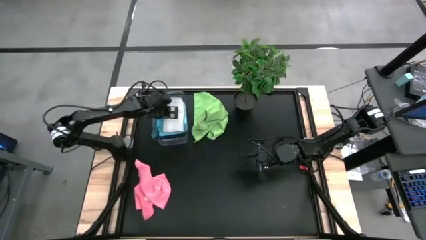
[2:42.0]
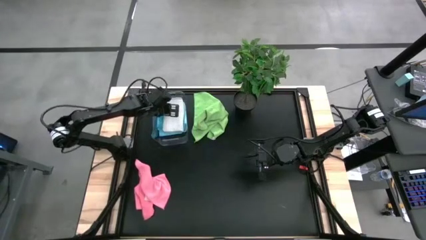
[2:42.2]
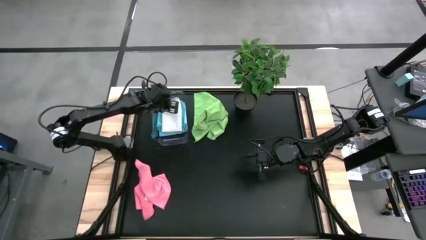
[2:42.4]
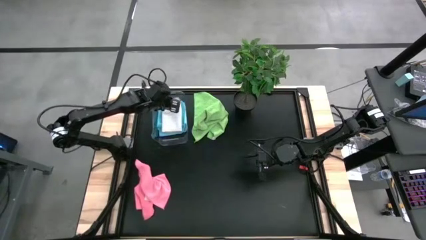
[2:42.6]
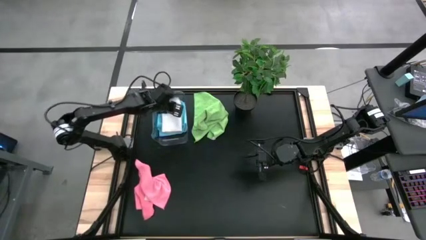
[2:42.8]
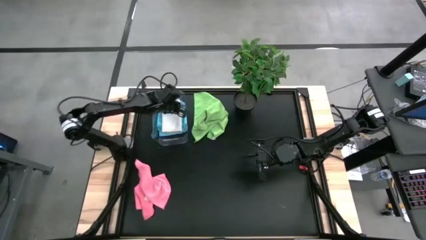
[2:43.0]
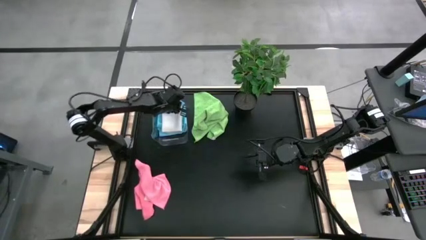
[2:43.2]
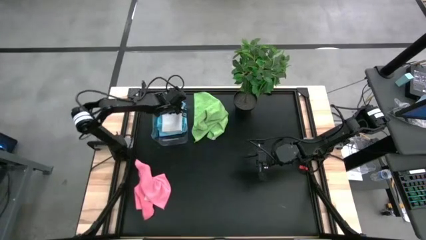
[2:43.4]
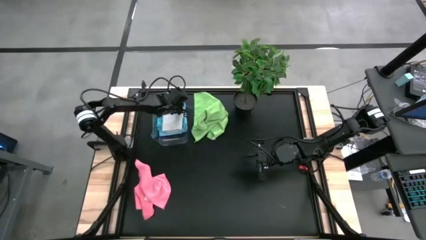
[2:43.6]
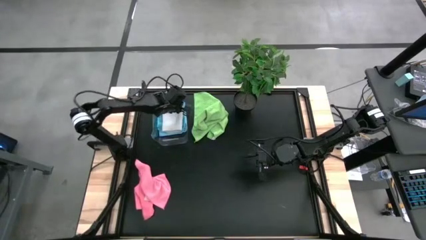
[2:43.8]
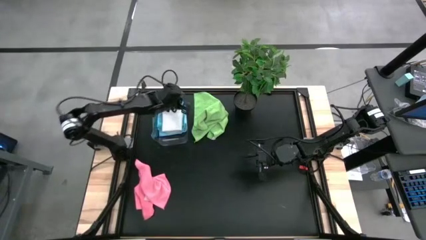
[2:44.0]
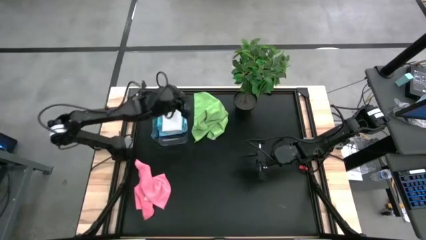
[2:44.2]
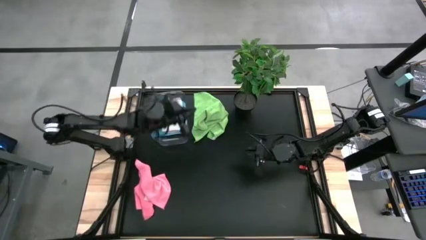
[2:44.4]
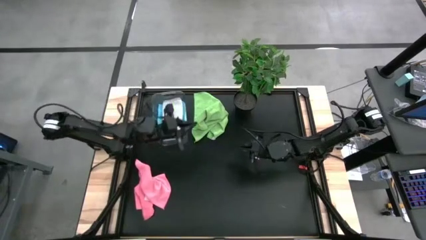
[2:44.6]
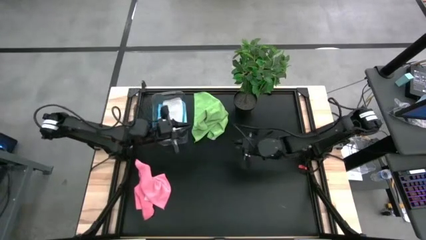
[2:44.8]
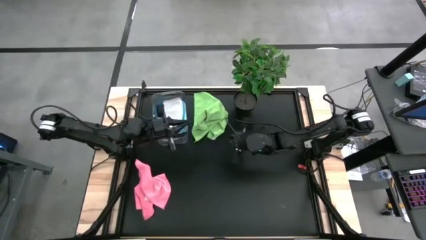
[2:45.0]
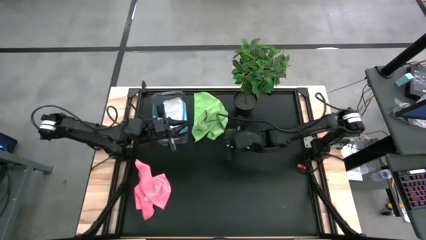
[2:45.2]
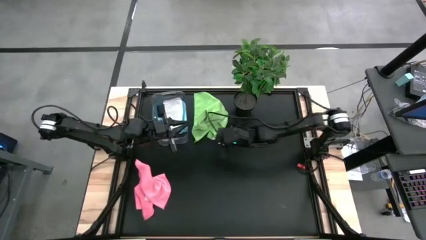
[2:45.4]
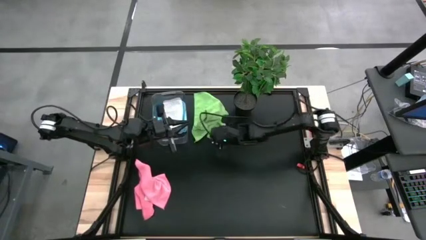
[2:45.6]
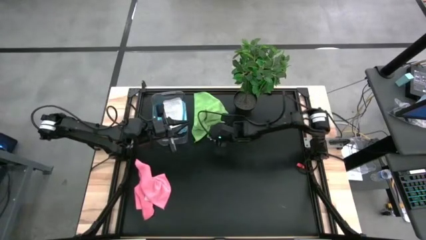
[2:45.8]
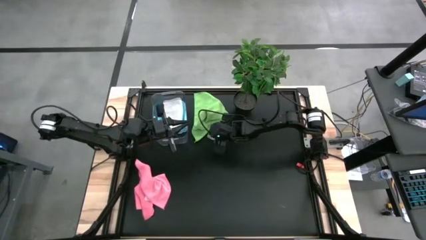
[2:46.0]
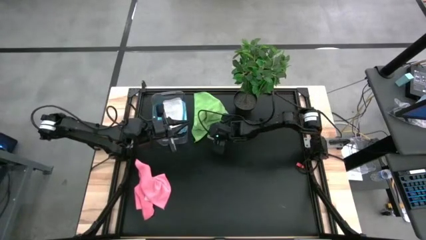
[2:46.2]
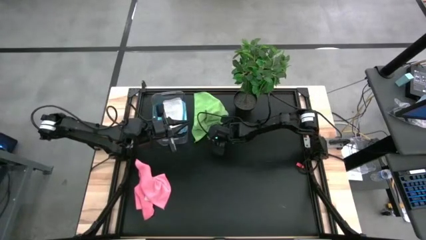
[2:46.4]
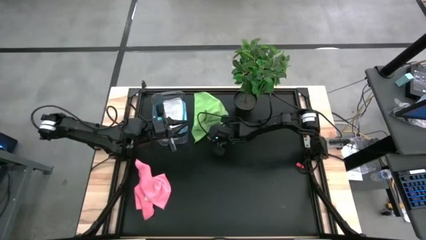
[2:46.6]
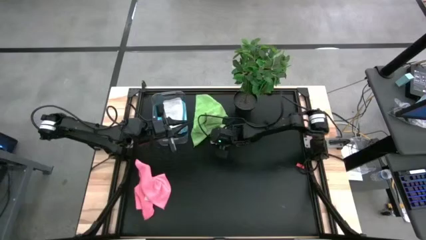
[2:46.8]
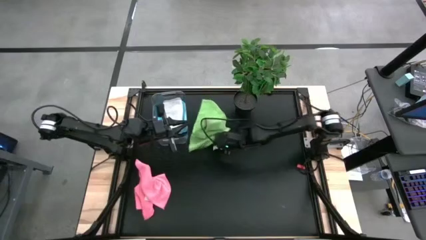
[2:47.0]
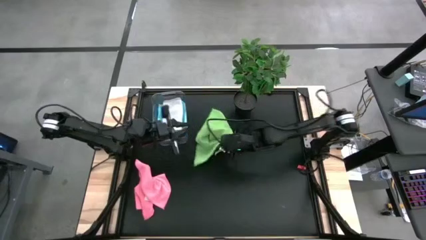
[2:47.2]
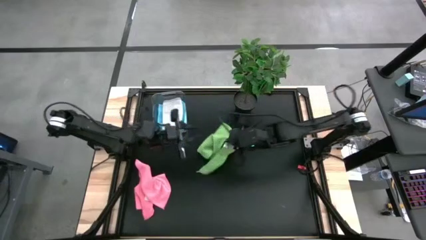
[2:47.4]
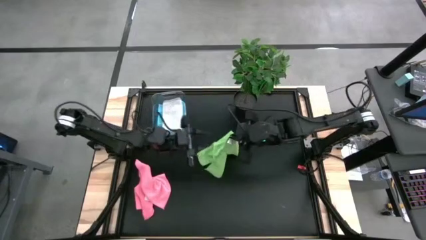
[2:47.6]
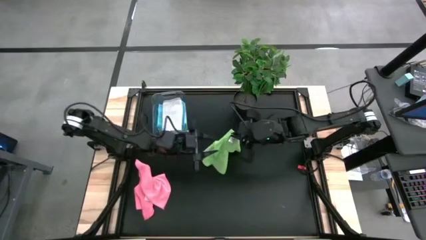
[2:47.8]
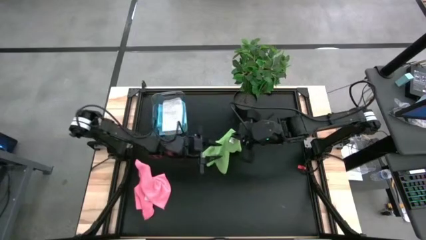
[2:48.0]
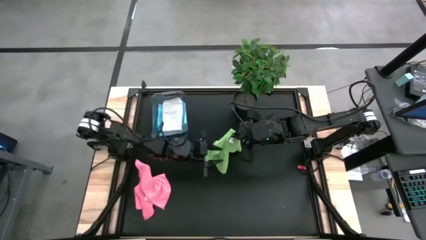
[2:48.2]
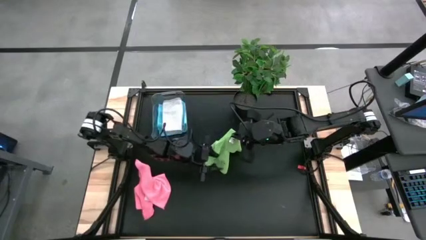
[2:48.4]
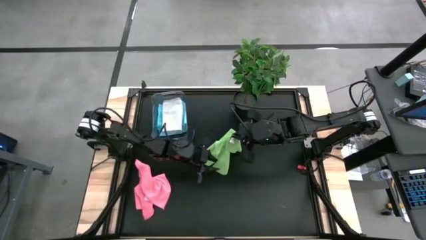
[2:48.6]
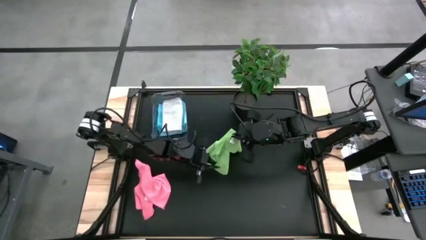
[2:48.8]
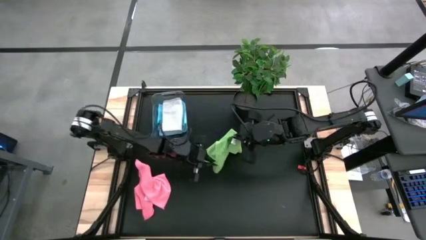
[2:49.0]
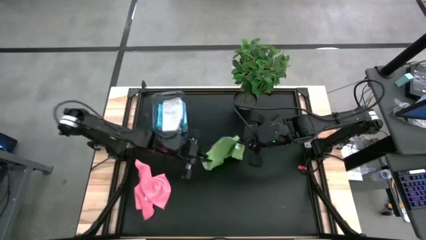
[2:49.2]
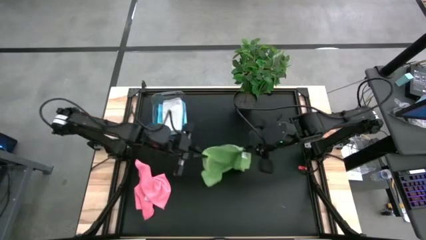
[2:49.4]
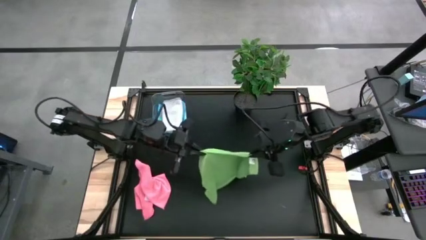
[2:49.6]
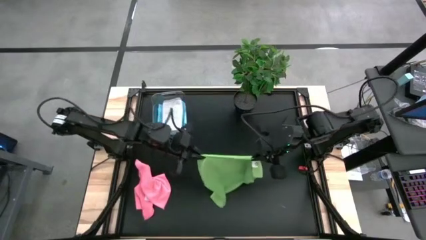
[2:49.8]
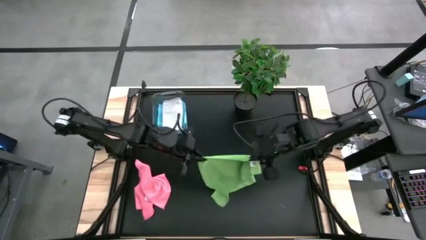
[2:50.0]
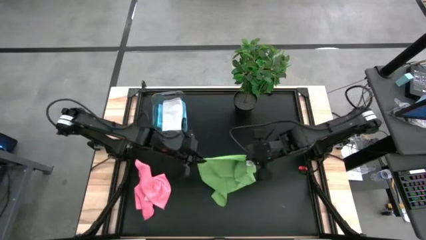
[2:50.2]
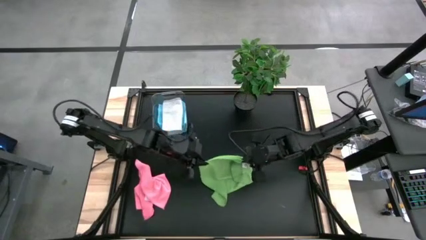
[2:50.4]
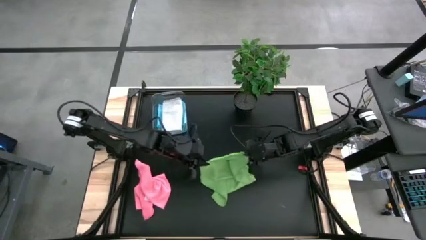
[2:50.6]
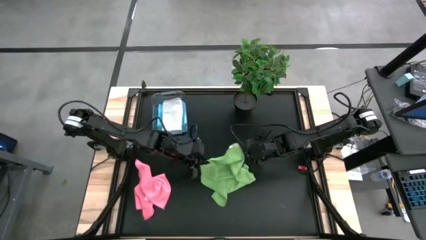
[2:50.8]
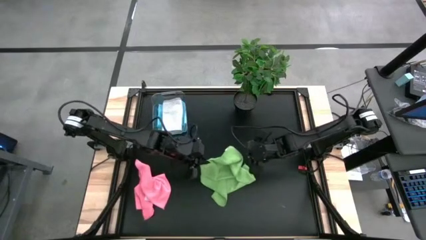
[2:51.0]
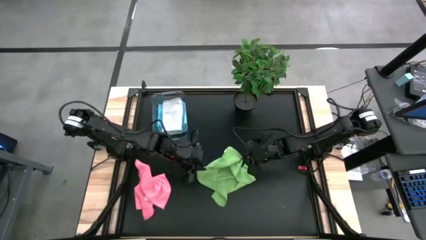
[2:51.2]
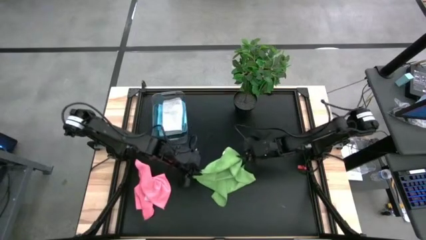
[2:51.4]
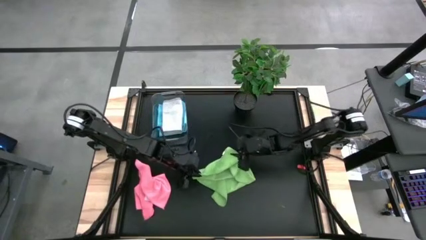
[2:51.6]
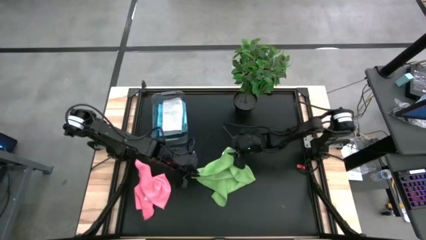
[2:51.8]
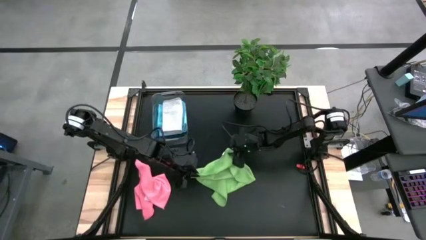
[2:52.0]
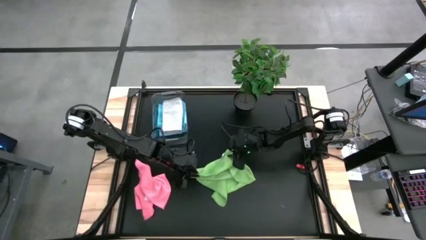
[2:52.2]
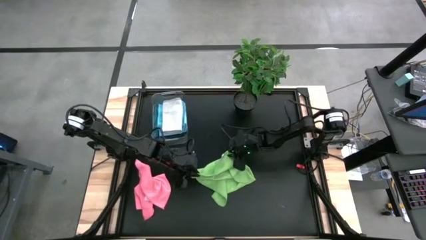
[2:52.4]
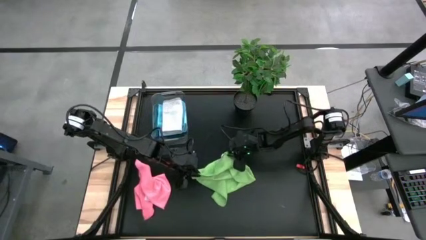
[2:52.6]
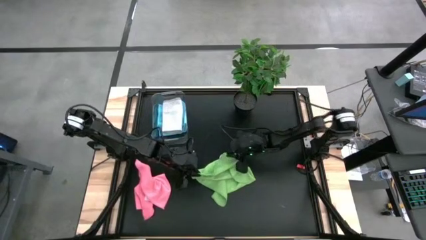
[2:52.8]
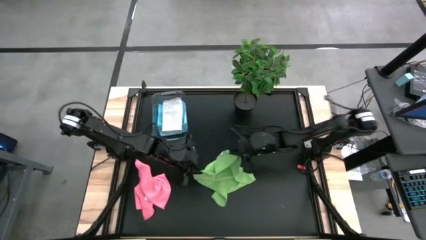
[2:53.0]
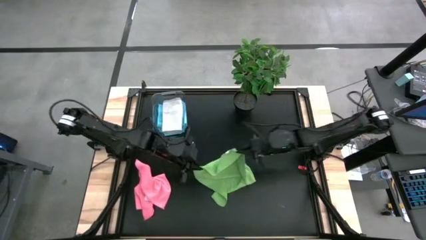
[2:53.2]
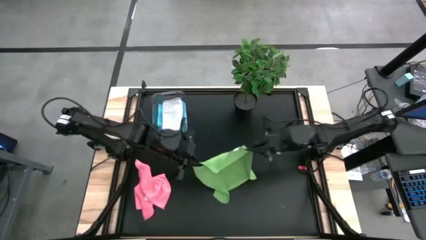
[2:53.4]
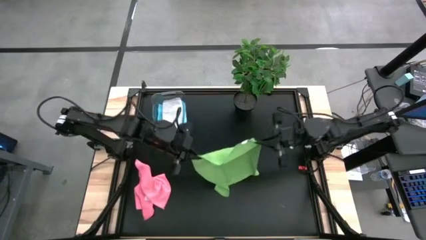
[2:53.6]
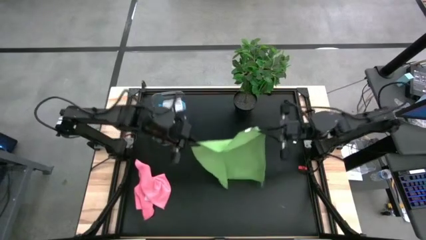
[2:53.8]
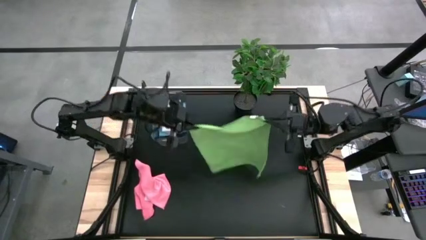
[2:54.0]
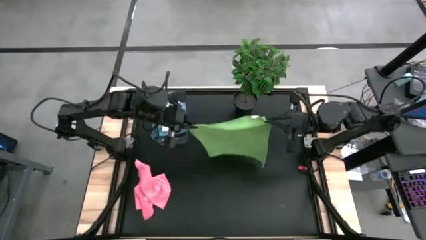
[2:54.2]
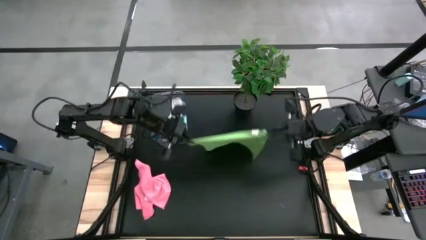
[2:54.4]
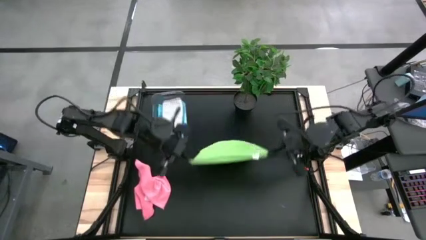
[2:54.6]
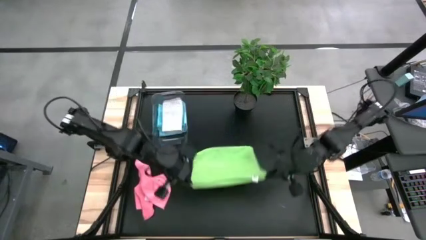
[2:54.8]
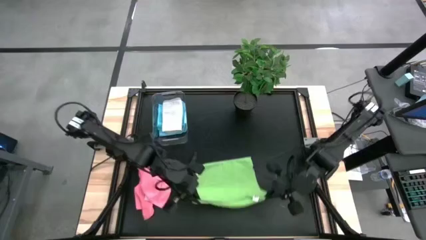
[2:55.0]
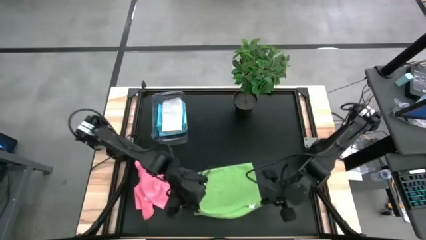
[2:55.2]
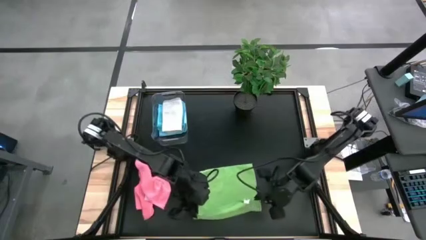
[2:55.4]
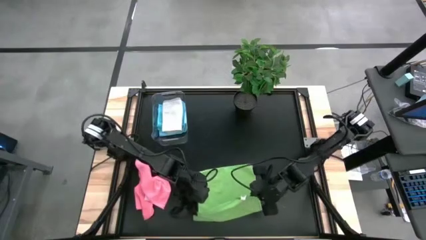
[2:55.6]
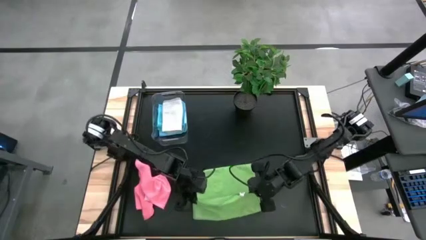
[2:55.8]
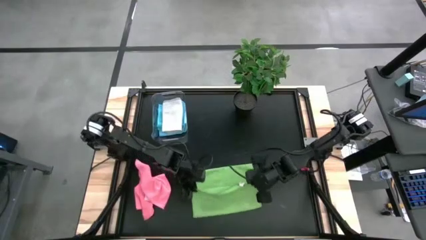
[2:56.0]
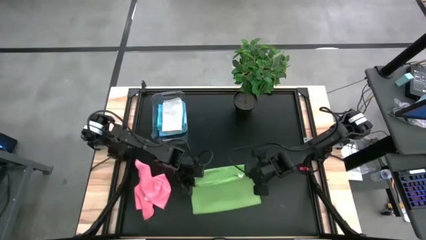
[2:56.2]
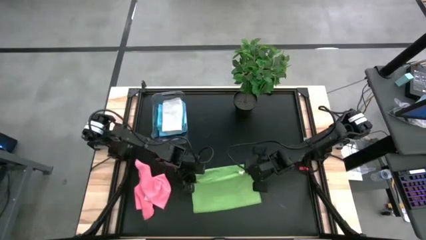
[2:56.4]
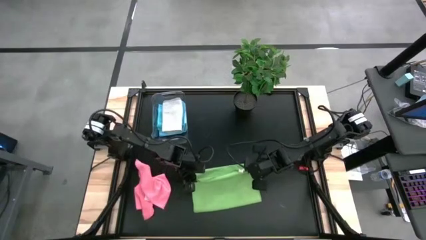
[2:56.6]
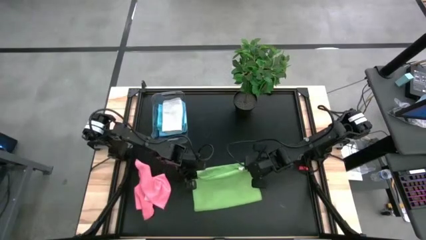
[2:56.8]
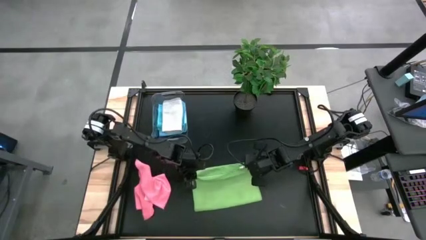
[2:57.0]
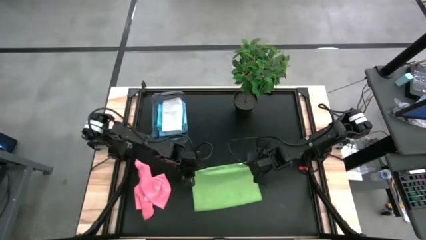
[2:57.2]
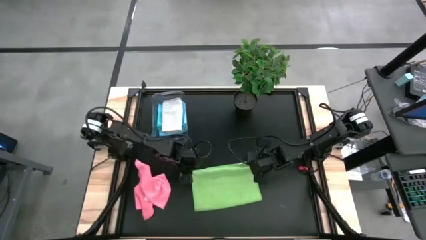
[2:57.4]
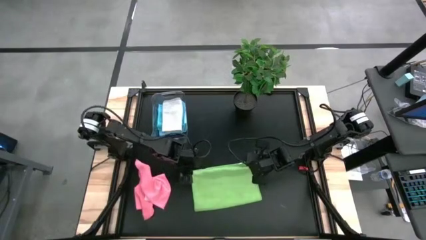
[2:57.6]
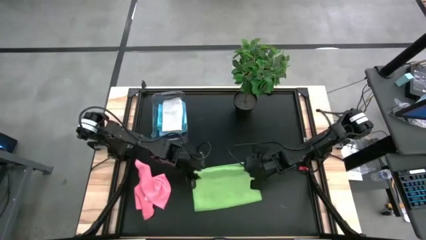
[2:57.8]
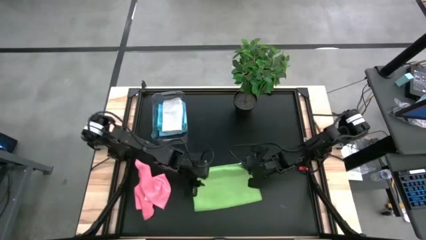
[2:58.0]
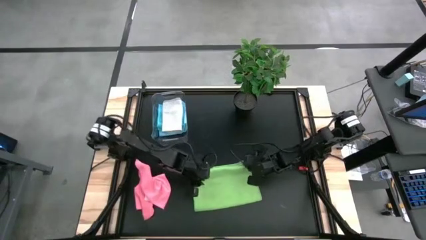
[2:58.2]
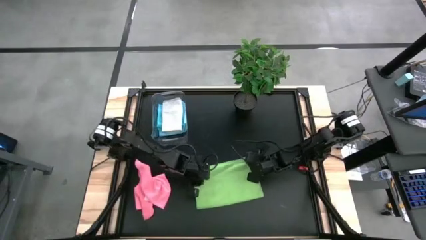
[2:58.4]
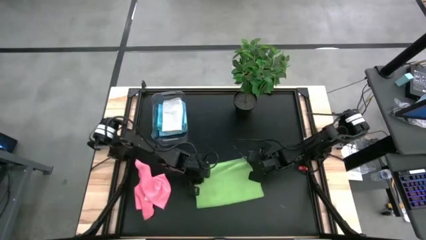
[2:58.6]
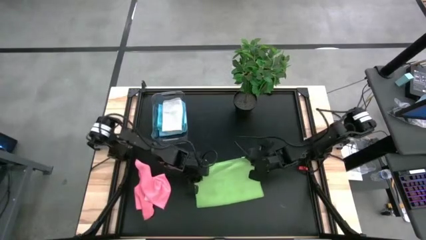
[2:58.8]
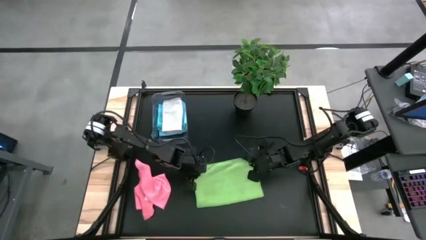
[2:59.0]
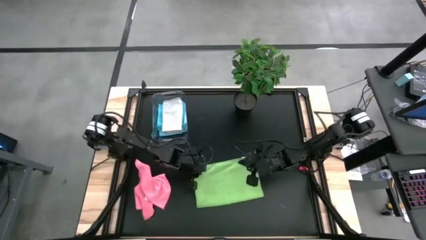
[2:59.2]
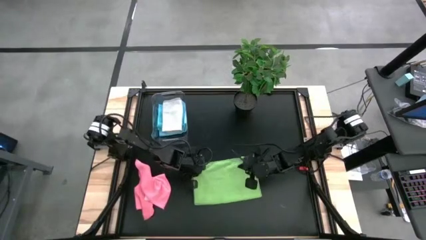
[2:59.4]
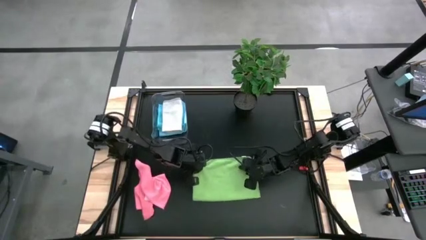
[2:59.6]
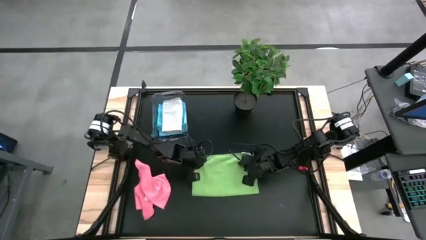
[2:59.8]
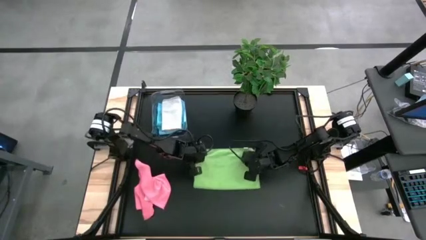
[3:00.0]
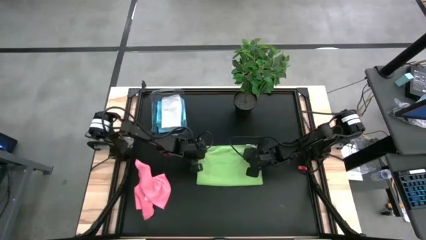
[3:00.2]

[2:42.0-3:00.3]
Task: Fold microfiber towels
Fold the green microfiber towel
